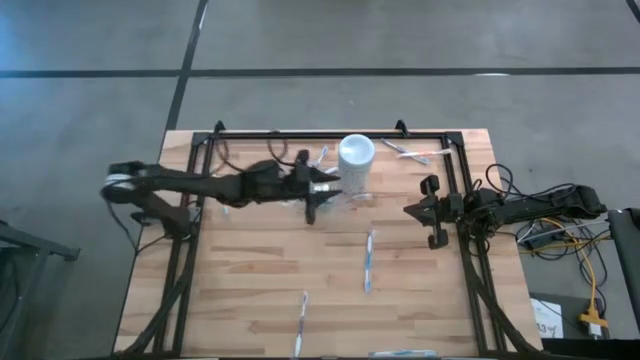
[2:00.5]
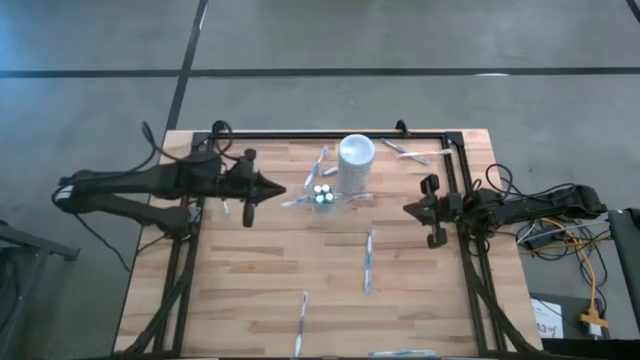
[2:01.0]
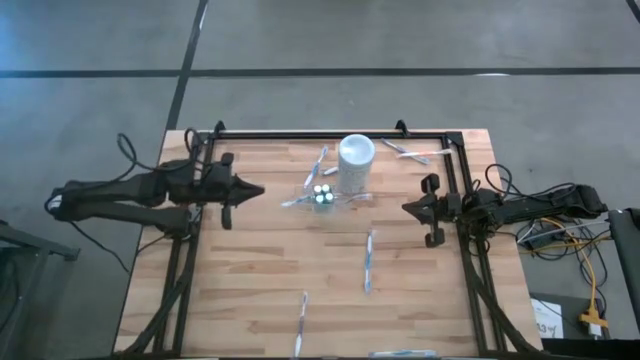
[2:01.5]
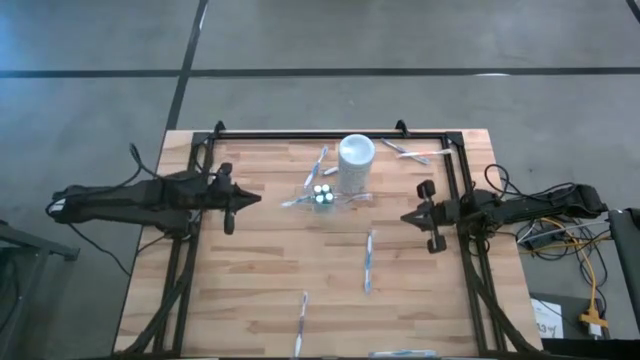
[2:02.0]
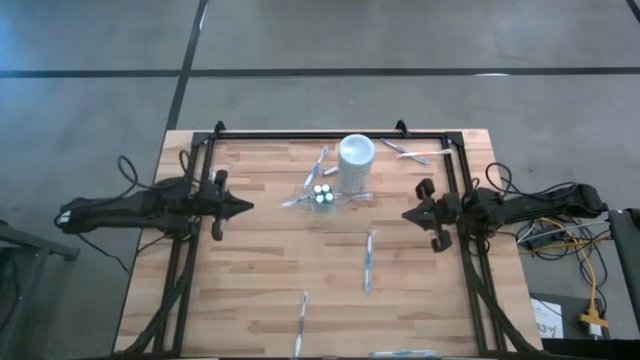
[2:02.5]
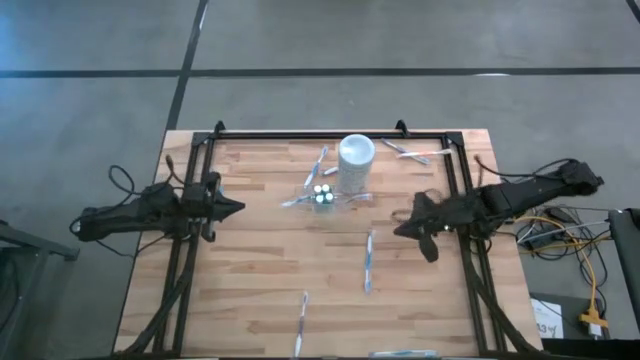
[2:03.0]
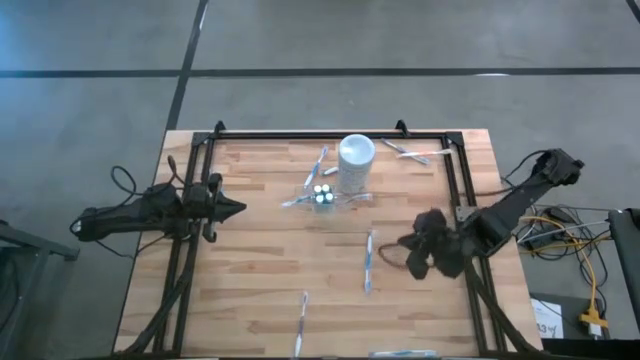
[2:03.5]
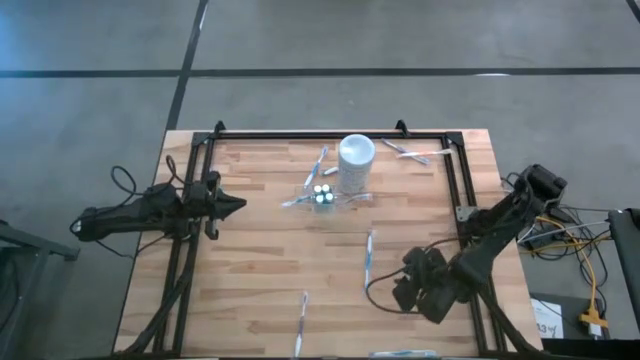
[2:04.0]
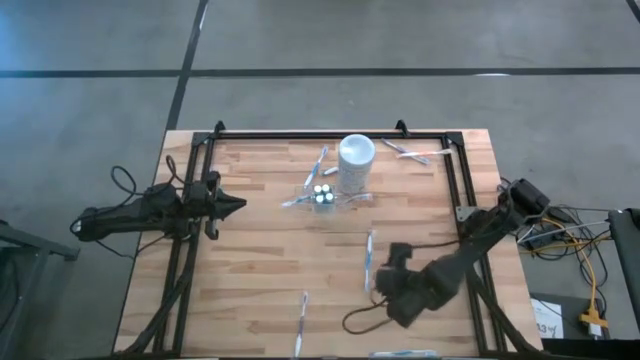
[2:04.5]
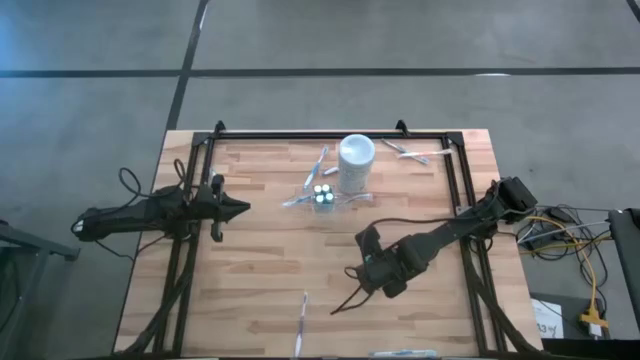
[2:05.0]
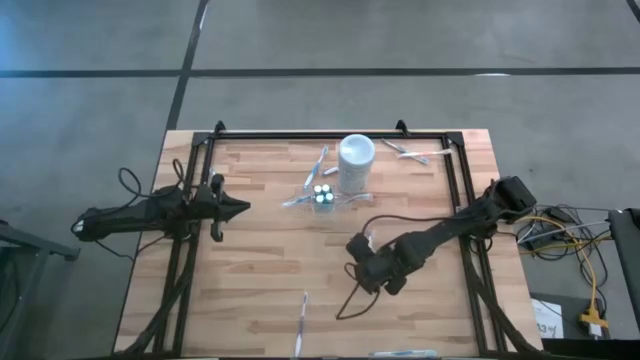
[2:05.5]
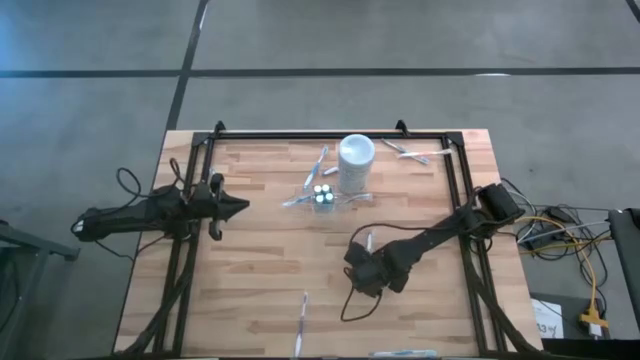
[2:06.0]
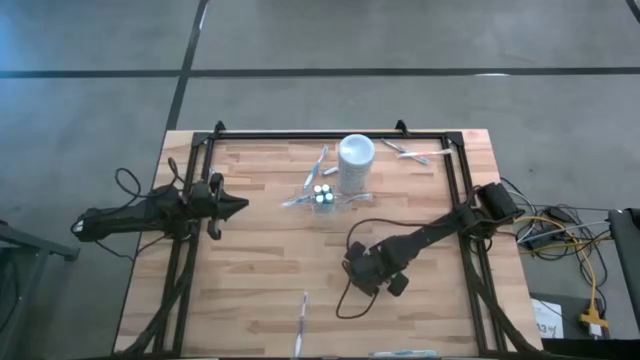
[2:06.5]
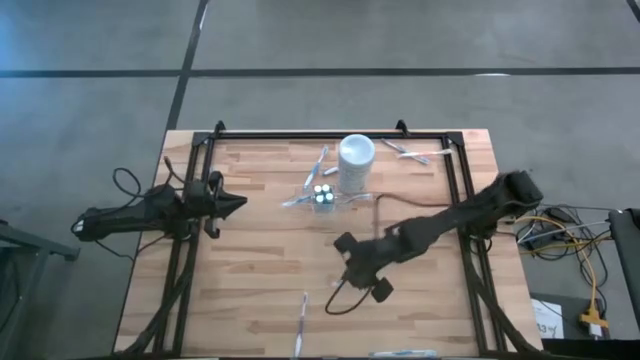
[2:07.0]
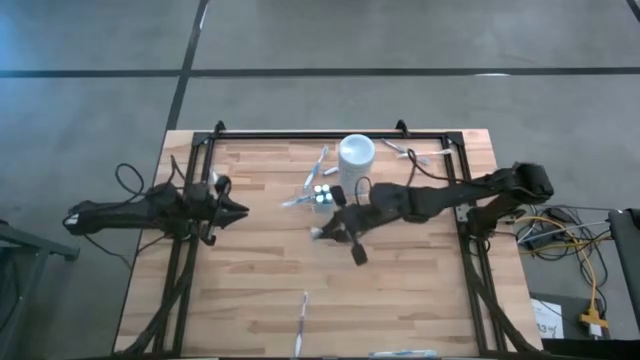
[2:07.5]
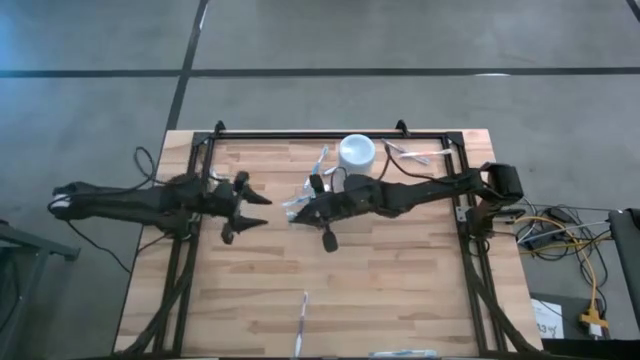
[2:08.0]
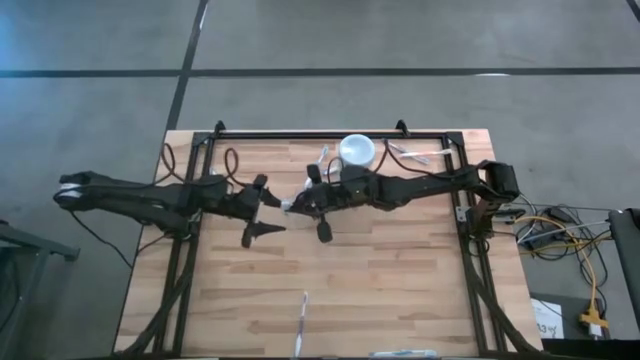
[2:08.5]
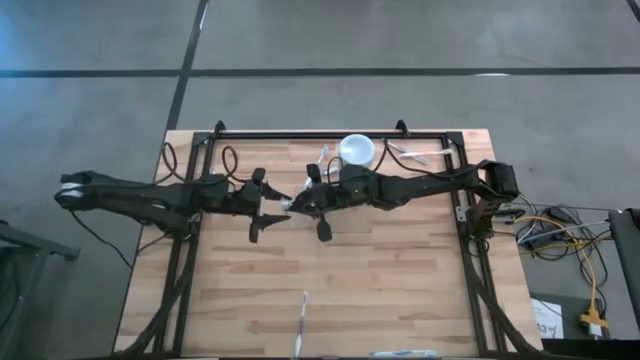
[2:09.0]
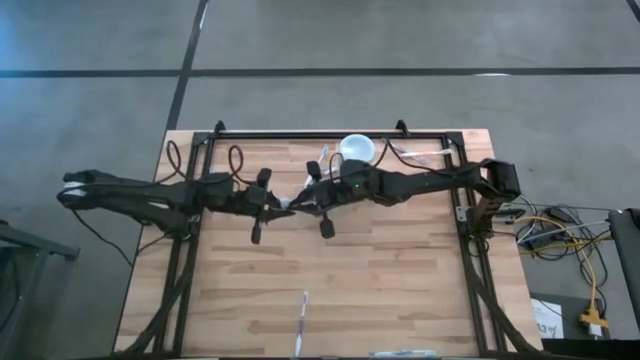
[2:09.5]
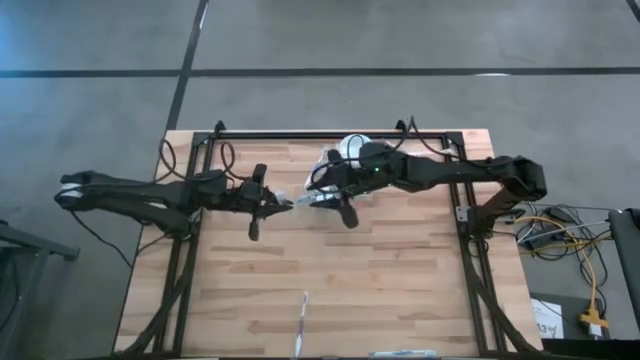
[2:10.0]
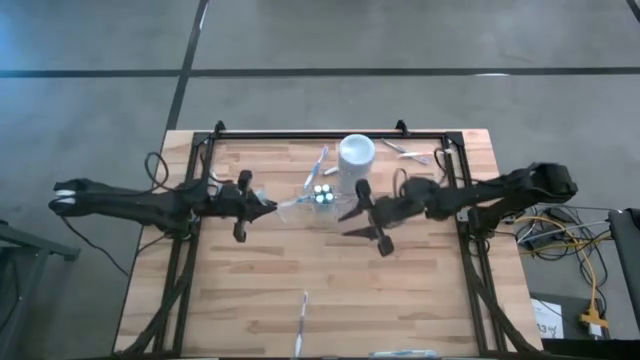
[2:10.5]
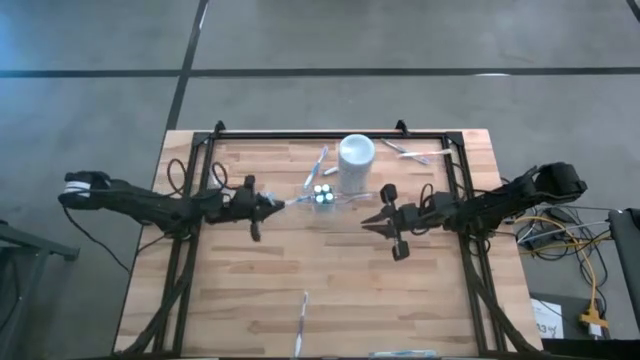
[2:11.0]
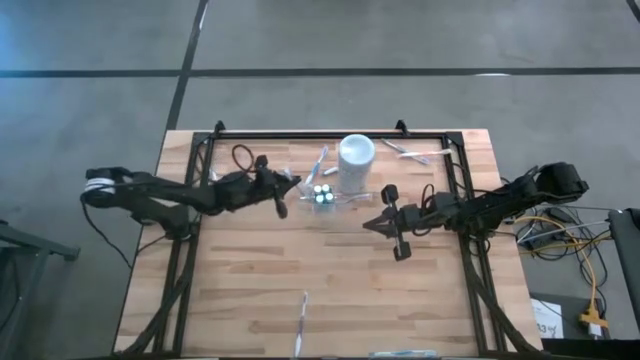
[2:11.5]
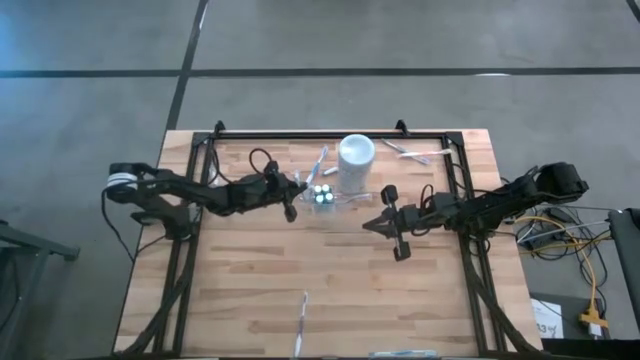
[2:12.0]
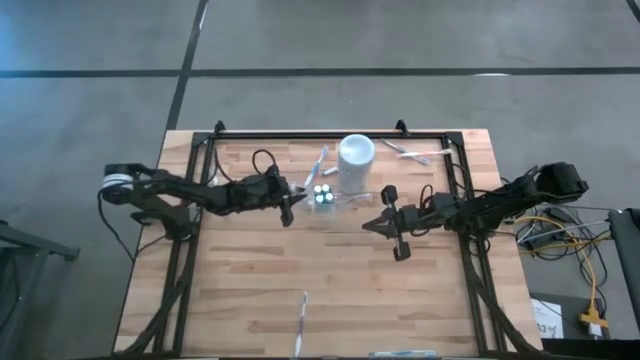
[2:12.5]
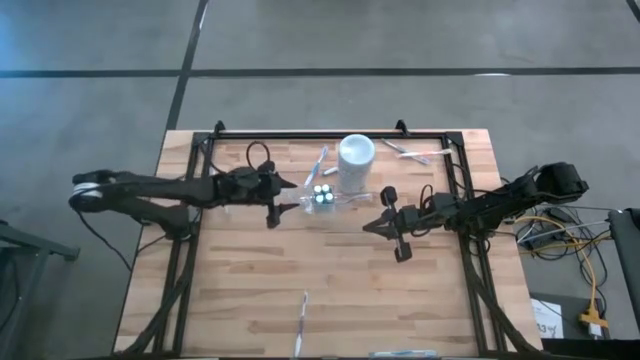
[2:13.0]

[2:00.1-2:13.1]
Task: Pick & Place toothbrushing station
Put the blue toothbrush into the transparent organizer

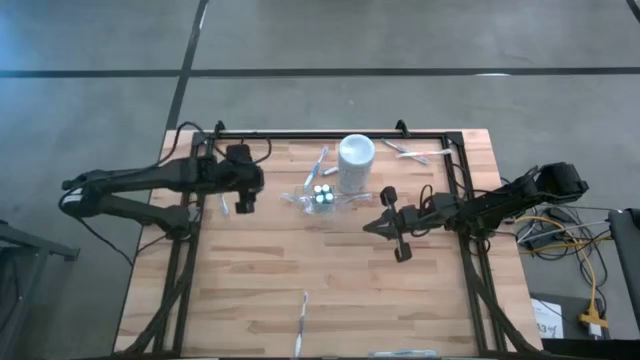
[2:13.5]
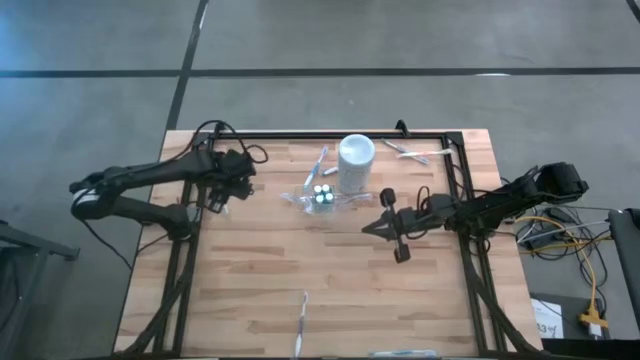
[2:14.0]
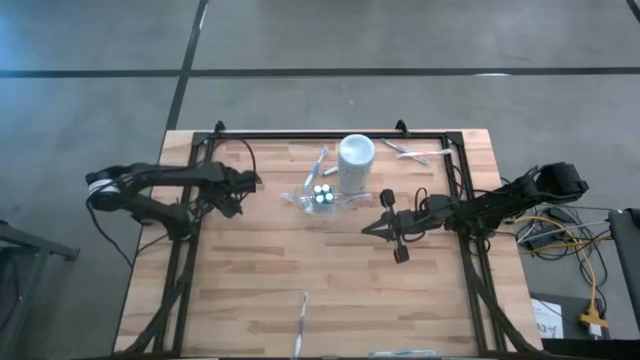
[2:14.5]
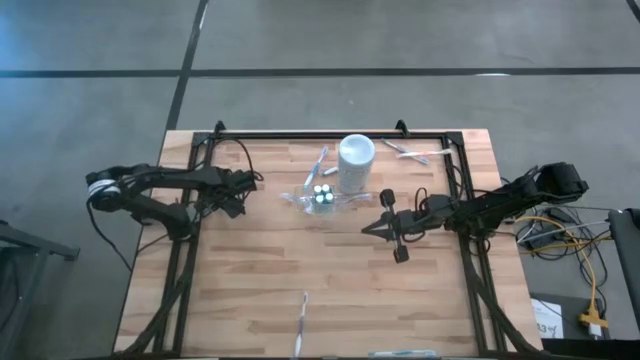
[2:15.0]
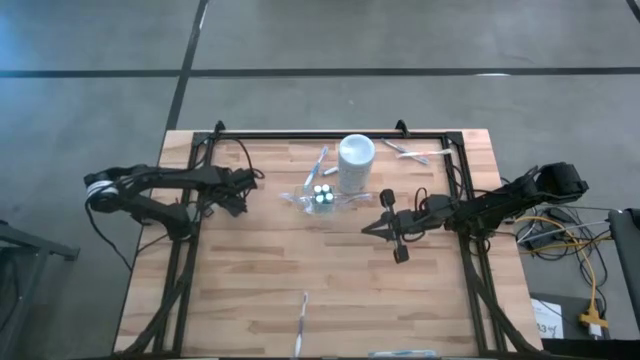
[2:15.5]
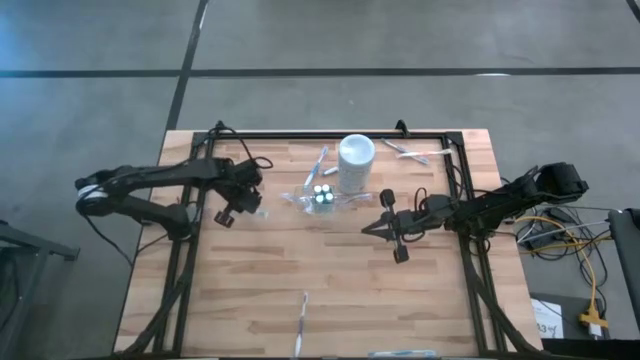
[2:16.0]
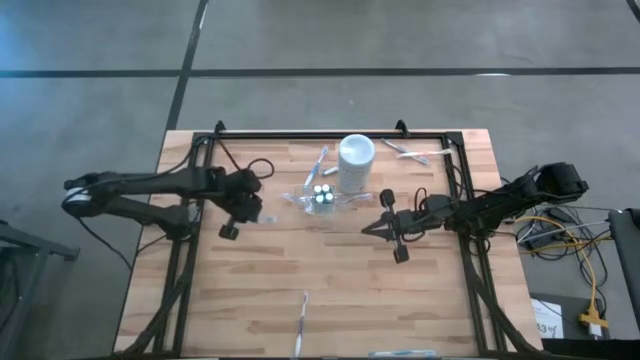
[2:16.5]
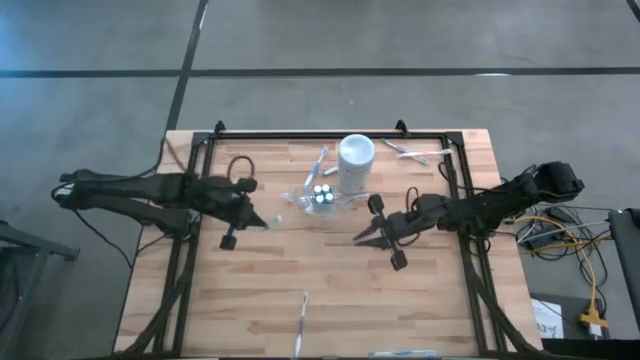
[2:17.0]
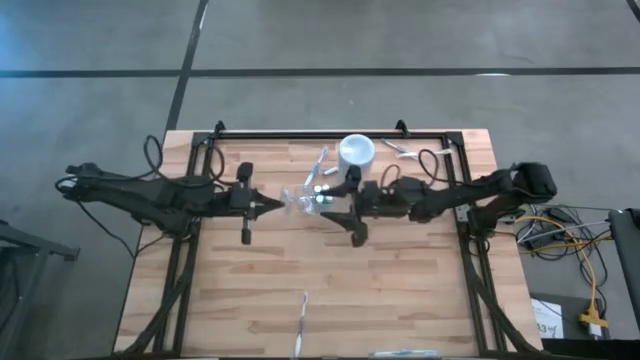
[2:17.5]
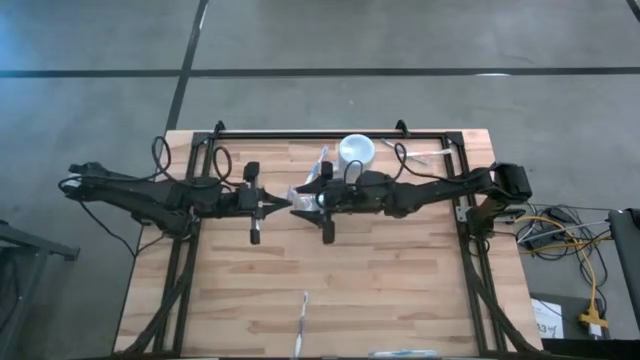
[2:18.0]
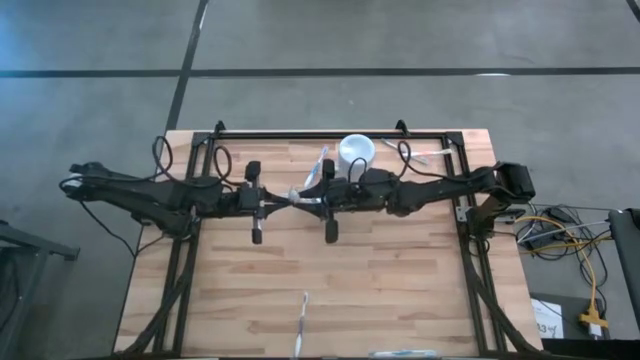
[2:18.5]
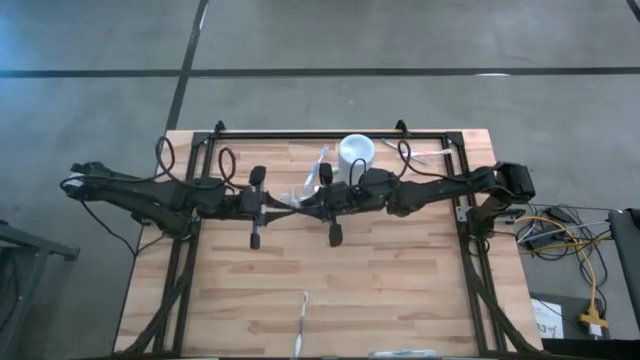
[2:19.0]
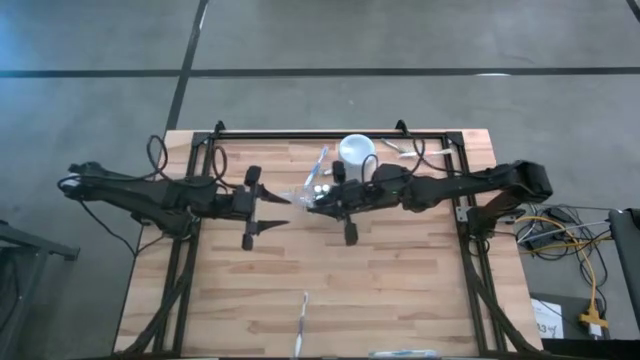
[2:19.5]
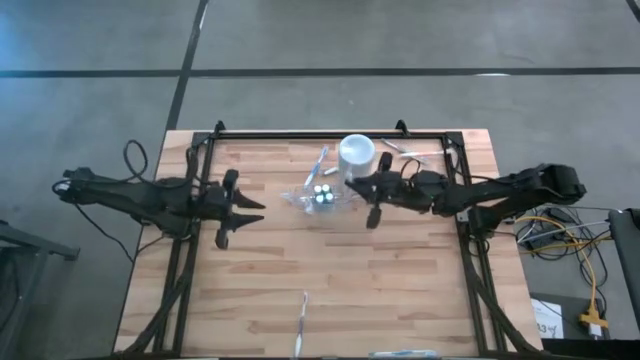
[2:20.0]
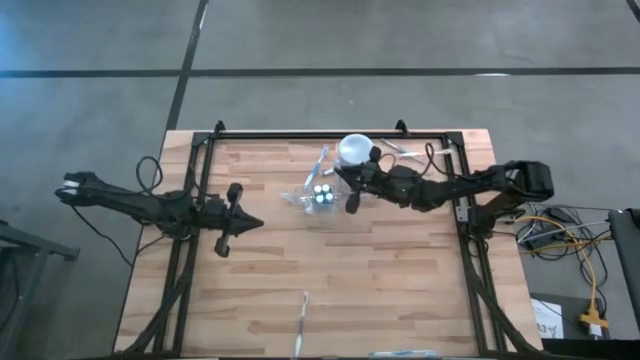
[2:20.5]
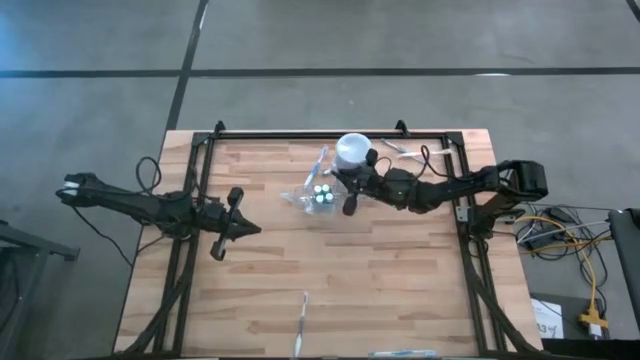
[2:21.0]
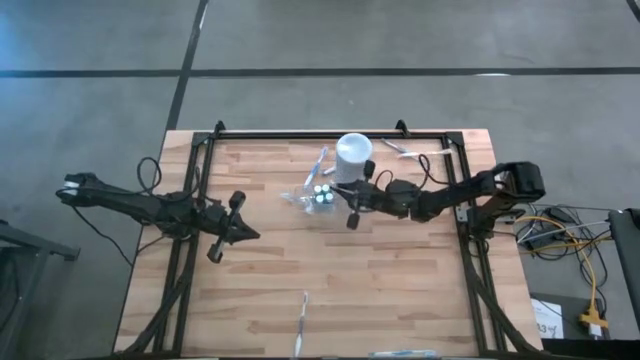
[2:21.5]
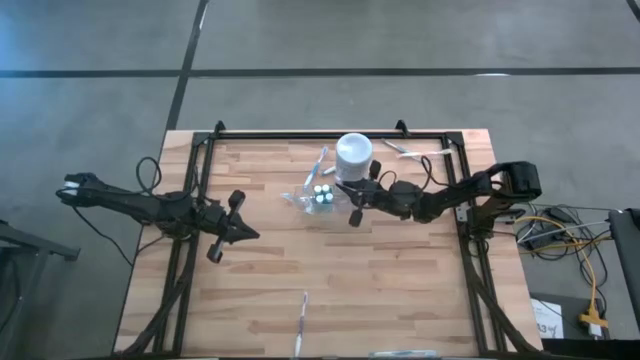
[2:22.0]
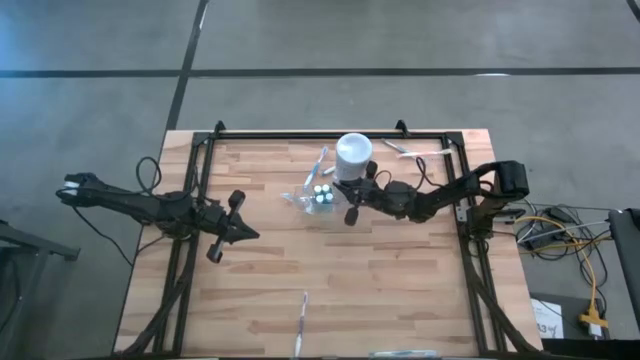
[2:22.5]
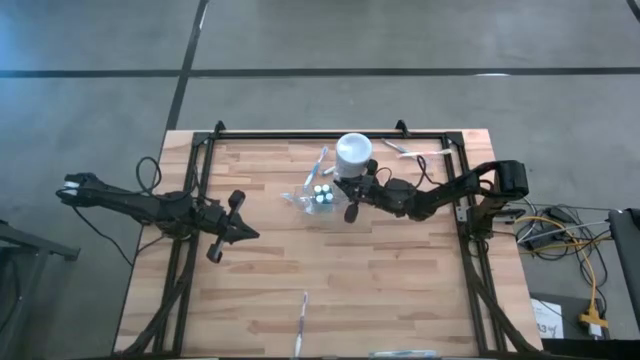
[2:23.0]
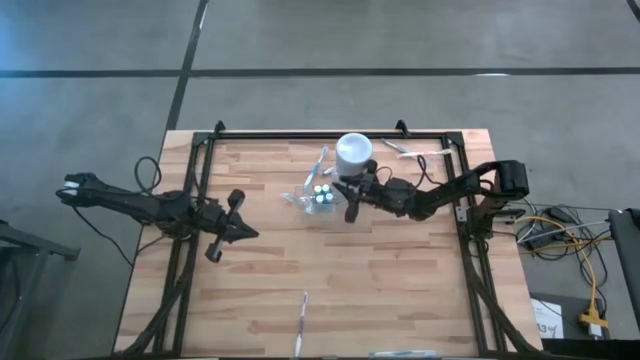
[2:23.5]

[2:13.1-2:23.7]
Put the blue toothbrush into the transparent organizer
